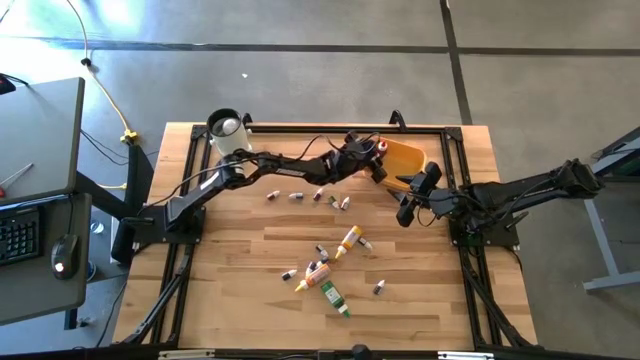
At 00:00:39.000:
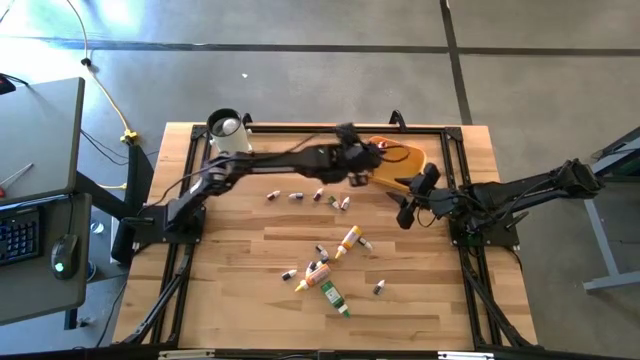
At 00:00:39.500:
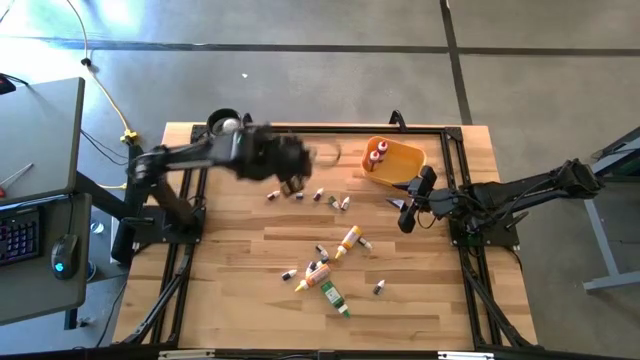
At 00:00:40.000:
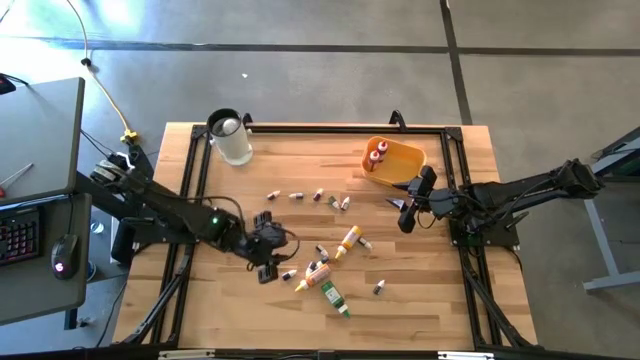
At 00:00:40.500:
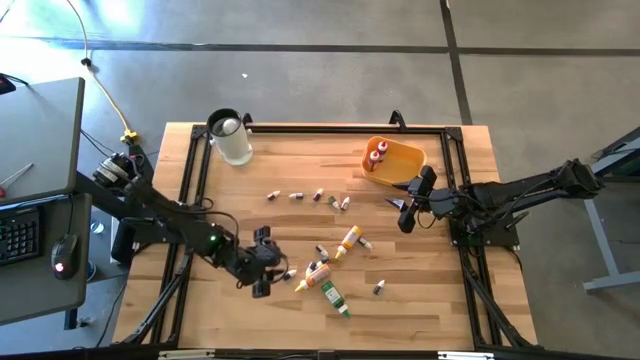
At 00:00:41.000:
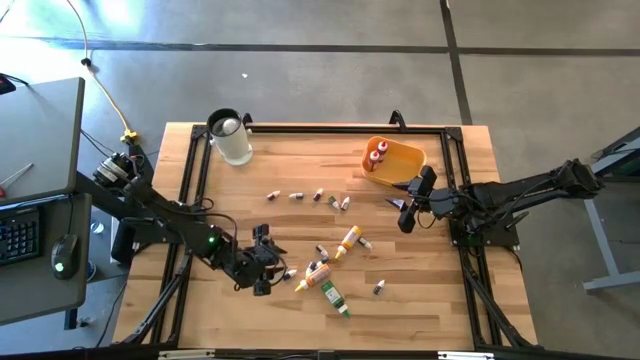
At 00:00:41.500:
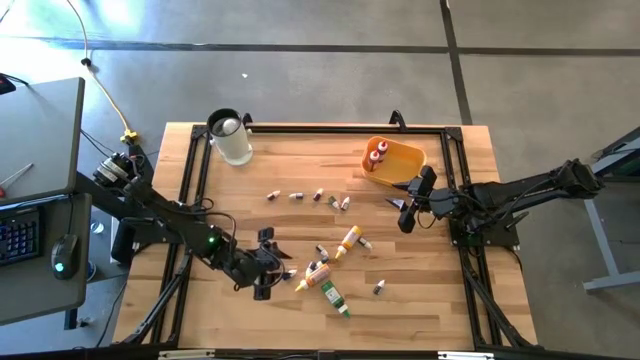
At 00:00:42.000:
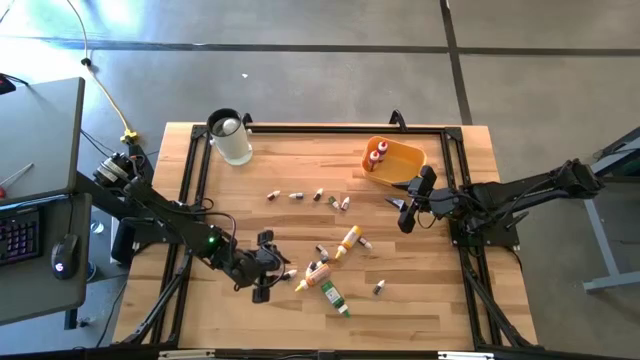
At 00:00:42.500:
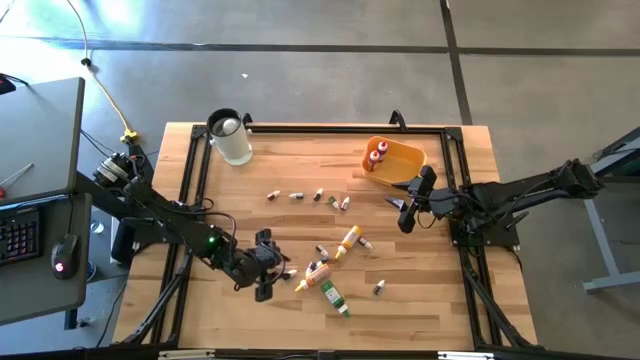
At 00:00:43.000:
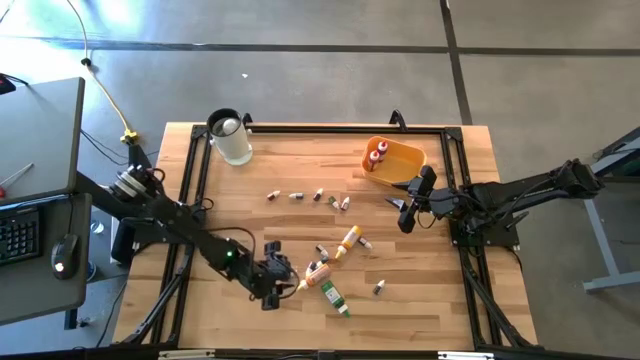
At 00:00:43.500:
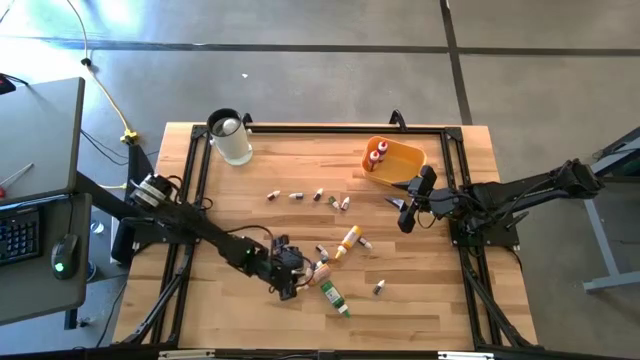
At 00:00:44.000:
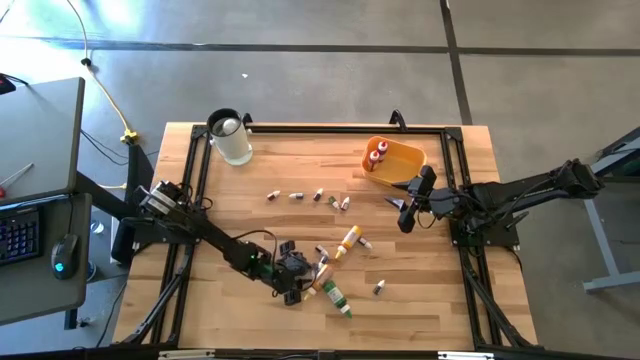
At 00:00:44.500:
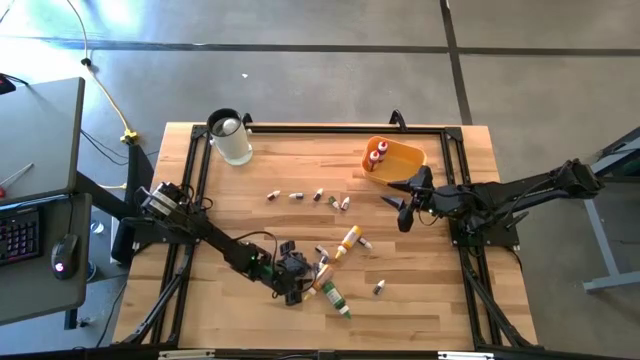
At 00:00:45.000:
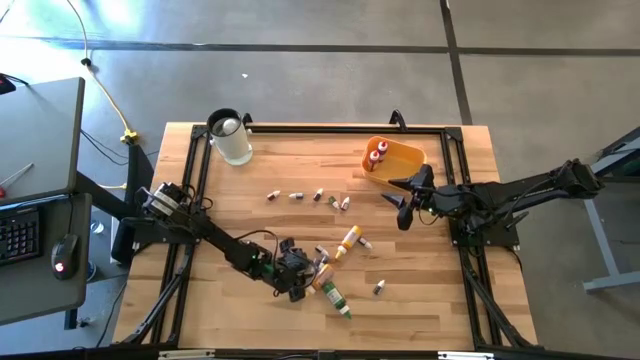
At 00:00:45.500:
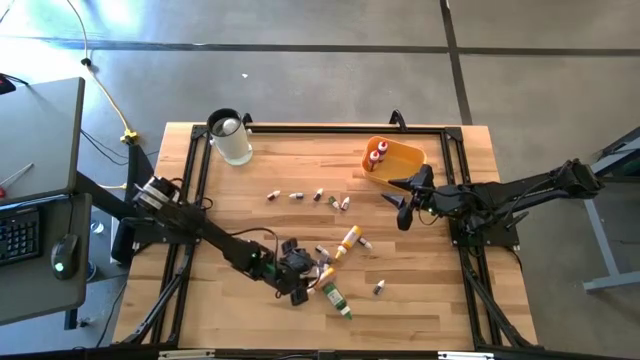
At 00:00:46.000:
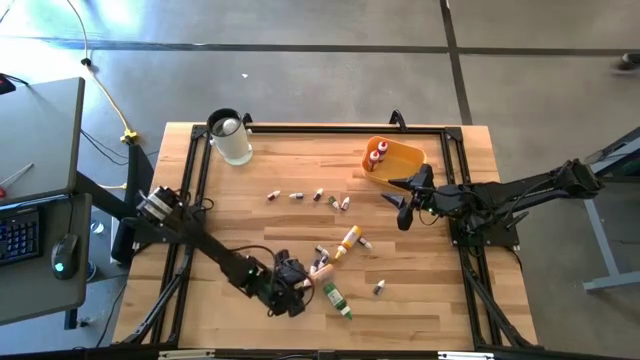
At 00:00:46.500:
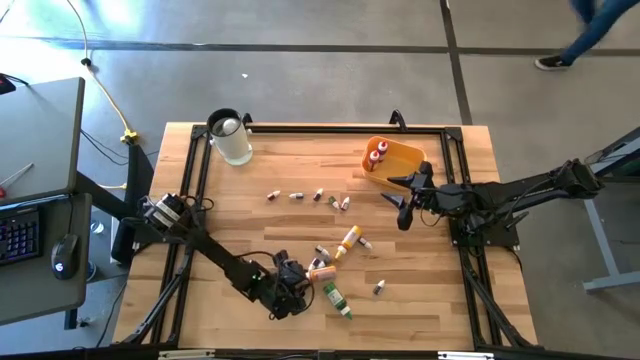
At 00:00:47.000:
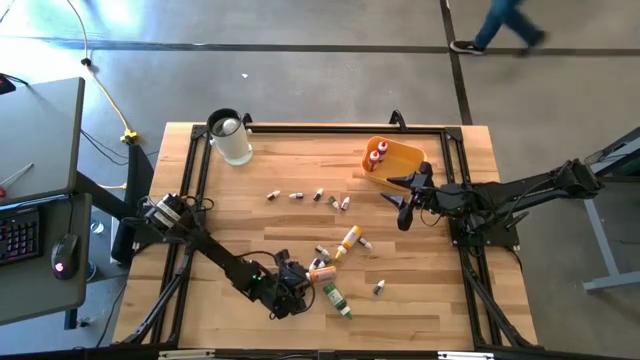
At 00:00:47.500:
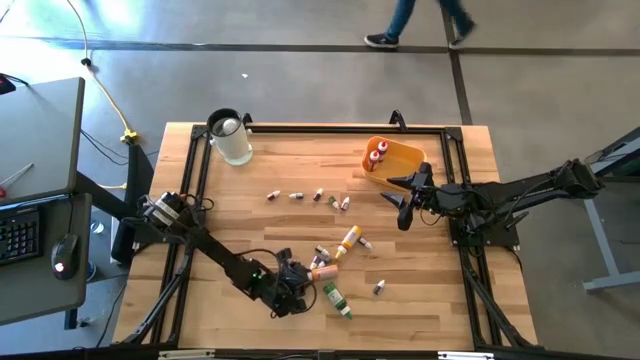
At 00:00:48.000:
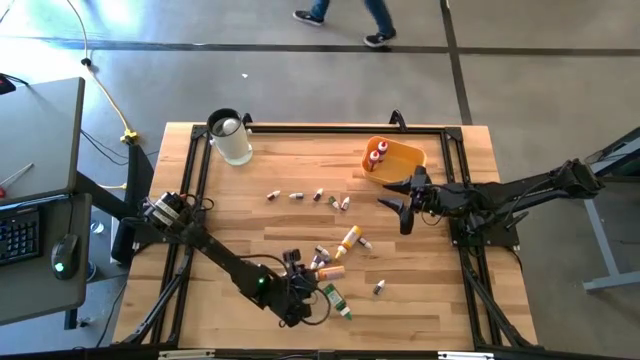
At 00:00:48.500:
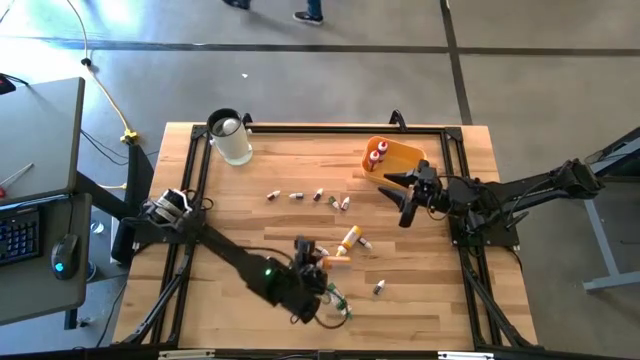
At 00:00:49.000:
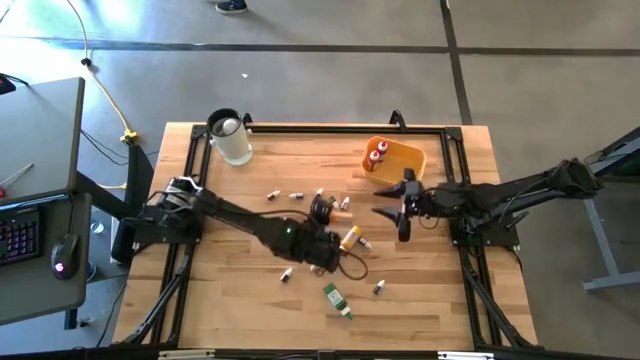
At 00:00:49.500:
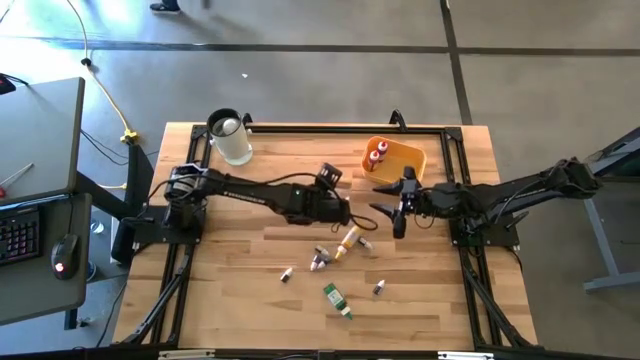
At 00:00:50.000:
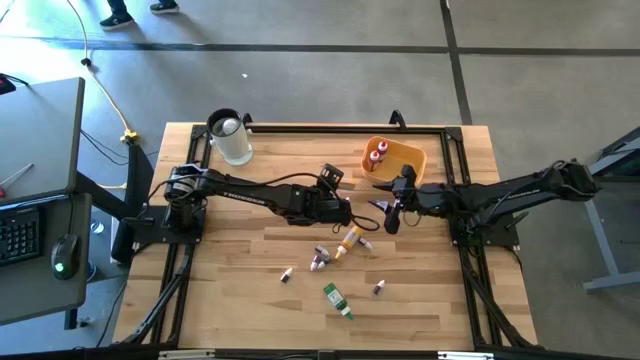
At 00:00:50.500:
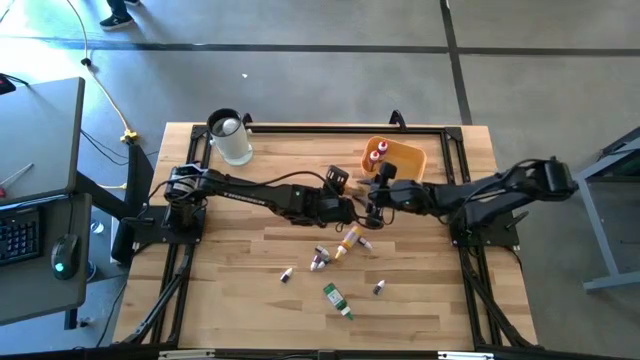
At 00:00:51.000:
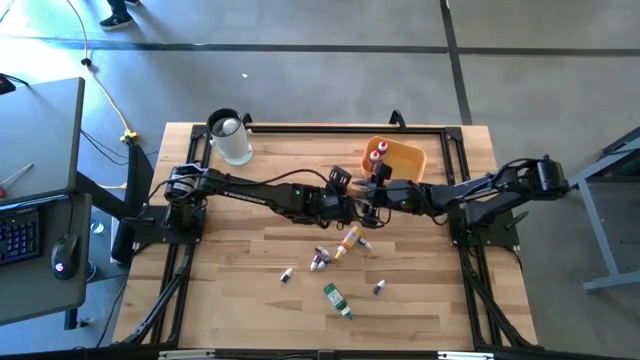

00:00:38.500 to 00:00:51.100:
Task: Pick & Place food coloring
Put the bottom large yellow food coloring bottle into the yellow bin
